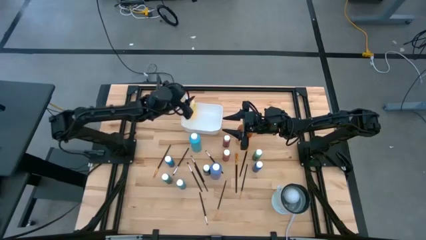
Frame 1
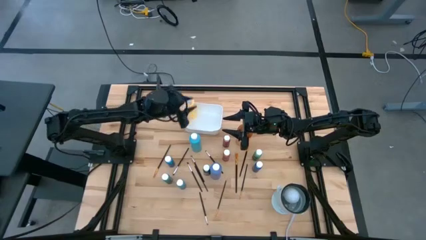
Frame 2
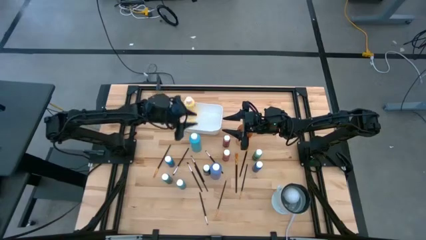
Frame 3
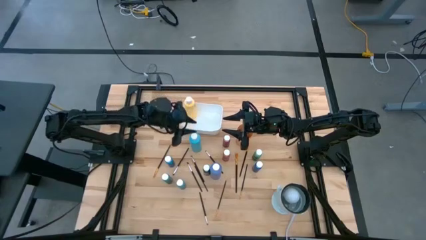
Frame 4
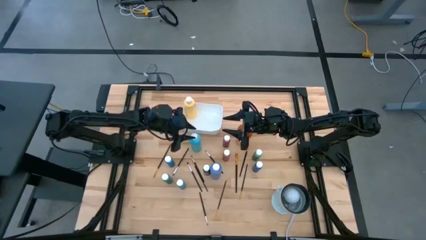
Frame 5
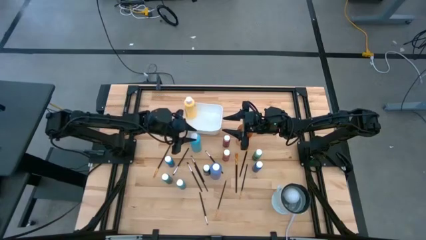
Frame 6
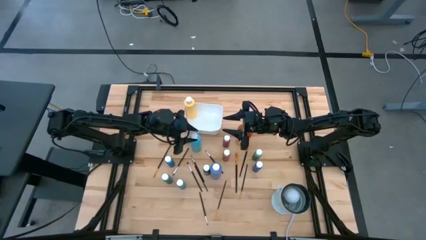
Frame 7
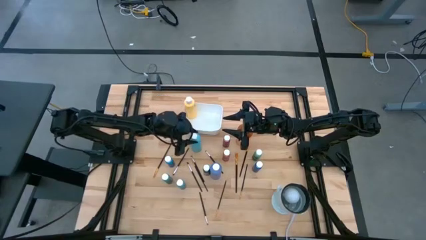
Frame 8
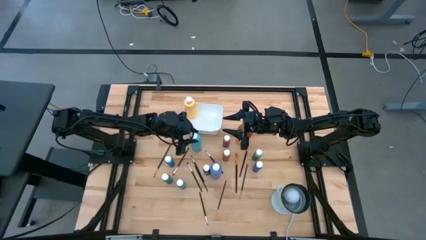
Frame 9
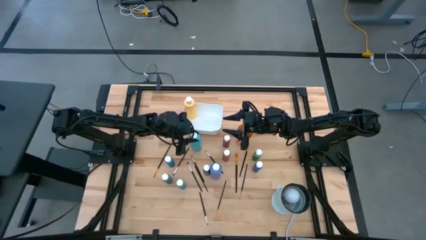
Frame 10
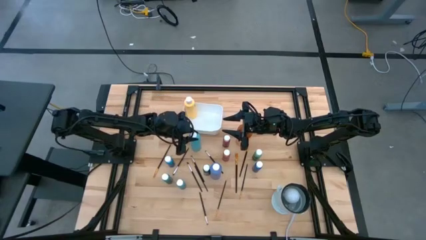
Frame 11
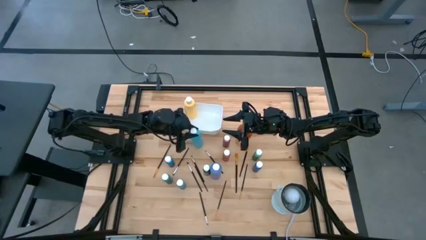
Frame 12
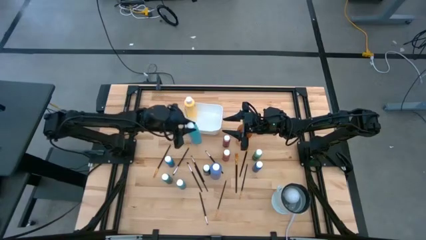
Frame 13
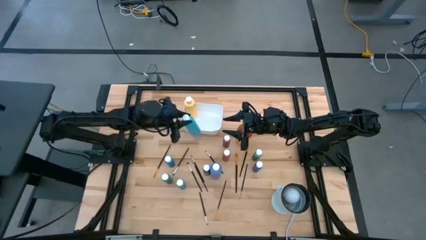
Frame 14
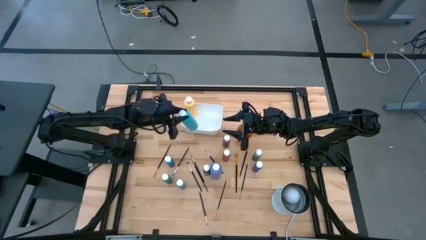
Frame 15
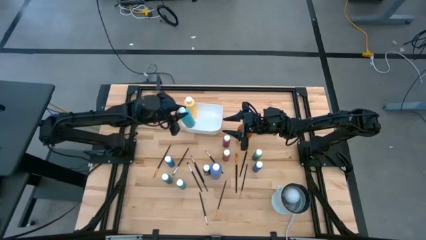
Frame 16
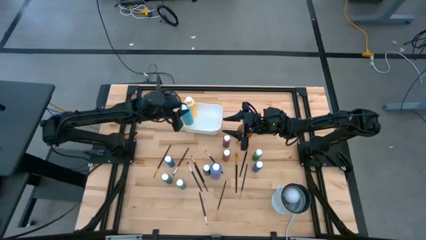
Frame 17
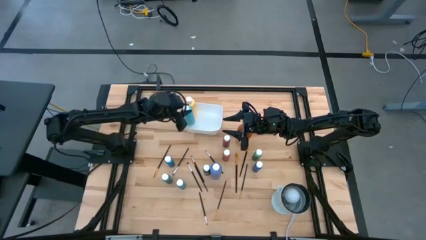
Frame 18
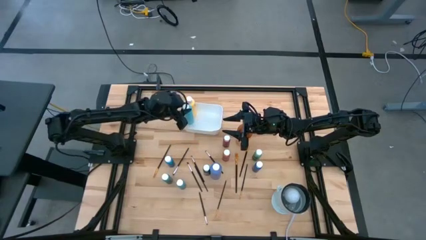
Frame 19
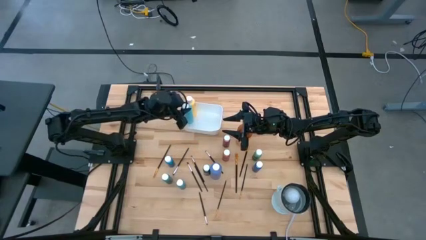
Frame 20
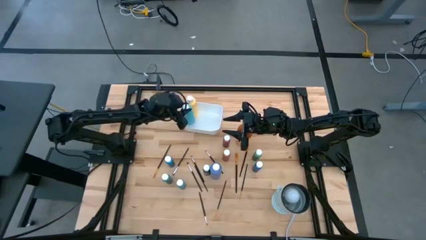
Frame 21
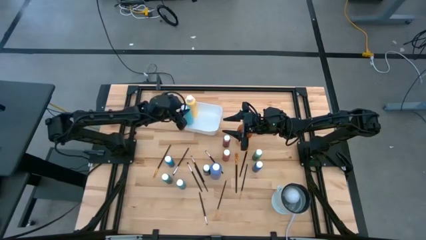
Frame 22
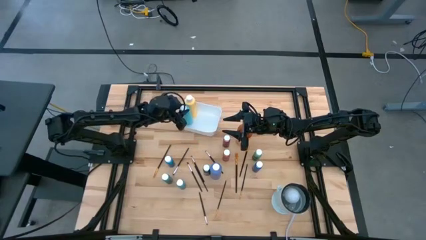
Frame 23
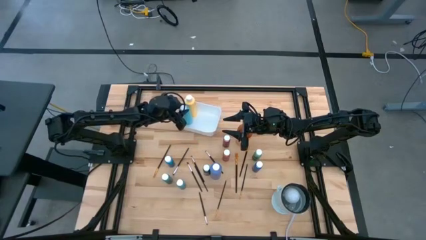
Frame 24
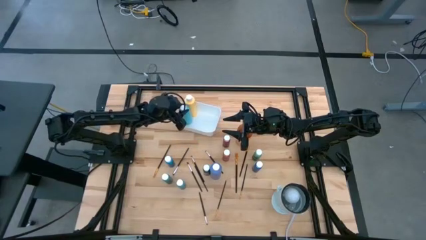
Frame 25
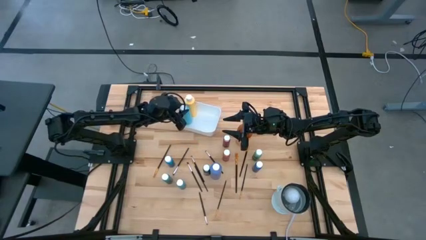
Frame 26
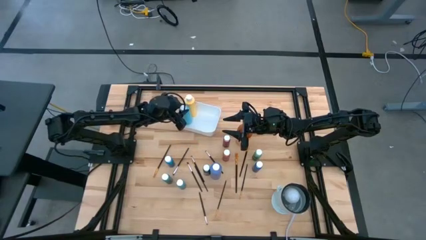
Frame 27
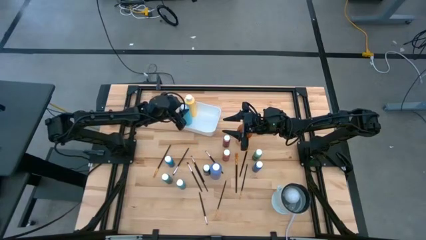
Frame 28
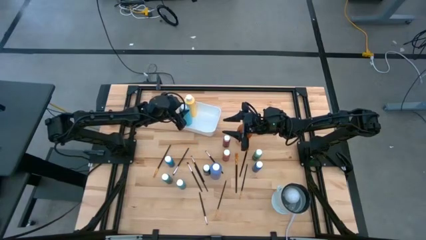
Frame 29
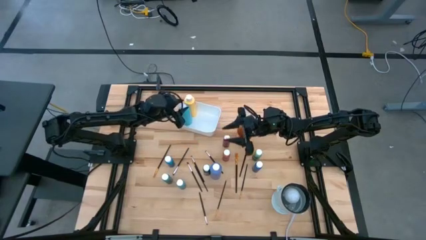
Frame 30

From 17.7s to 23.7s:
Task: Pick & Place Paint Supplies
Put the large light blue paint bottle into the bin

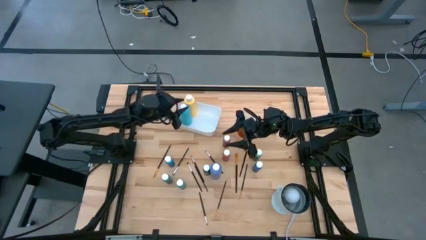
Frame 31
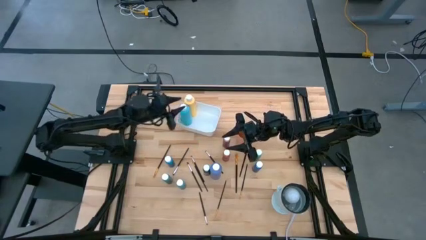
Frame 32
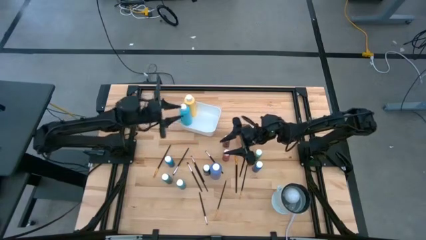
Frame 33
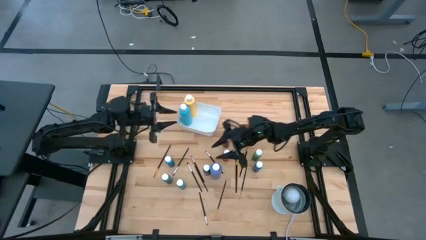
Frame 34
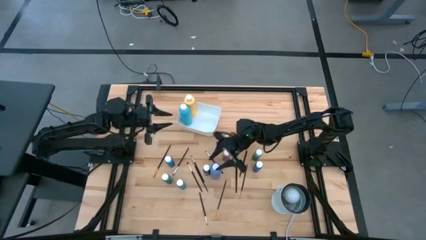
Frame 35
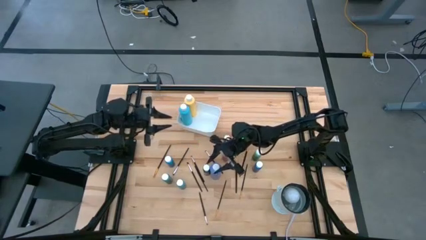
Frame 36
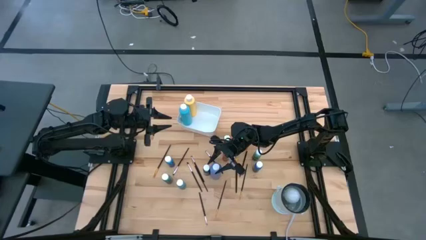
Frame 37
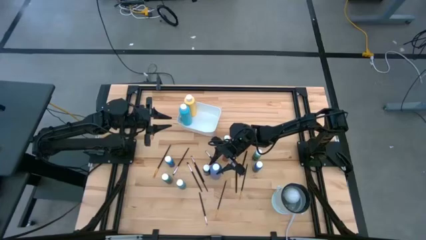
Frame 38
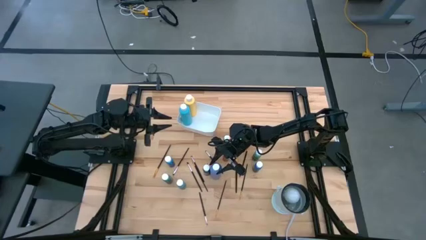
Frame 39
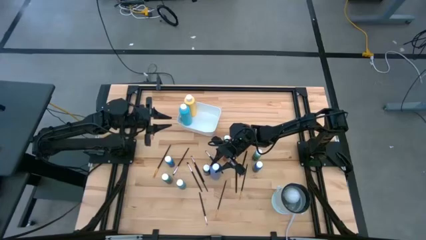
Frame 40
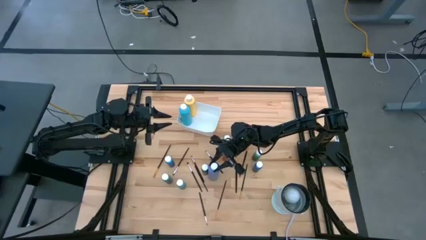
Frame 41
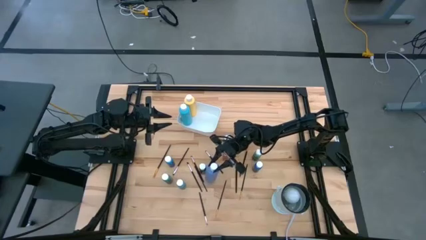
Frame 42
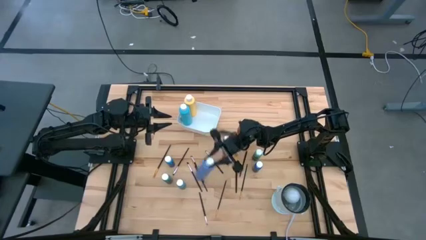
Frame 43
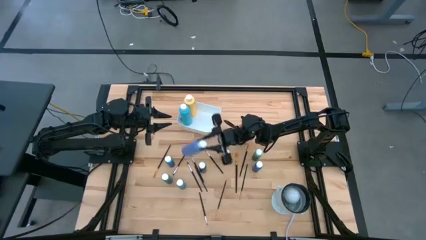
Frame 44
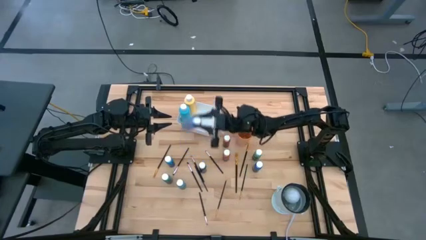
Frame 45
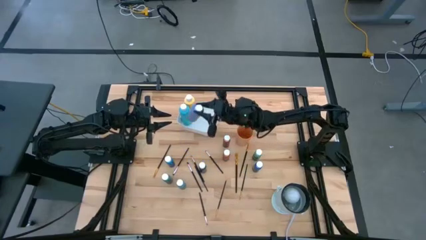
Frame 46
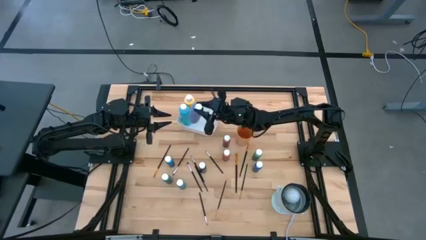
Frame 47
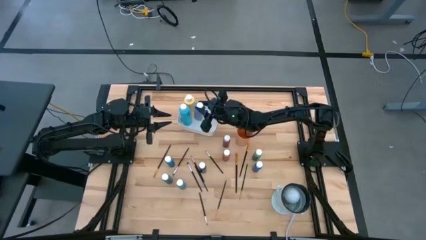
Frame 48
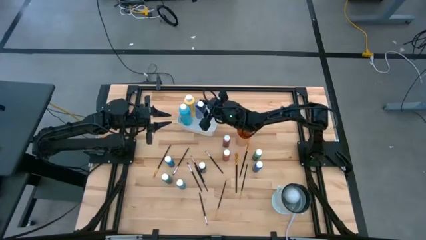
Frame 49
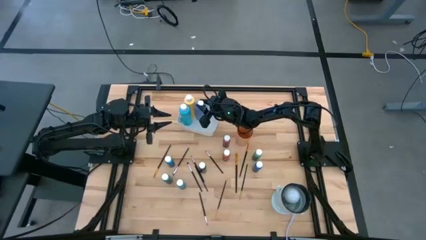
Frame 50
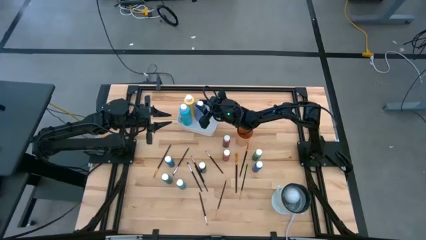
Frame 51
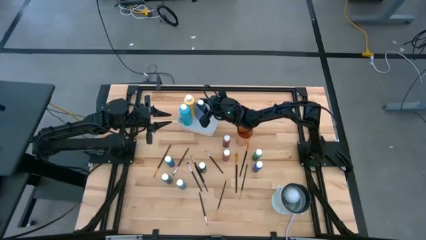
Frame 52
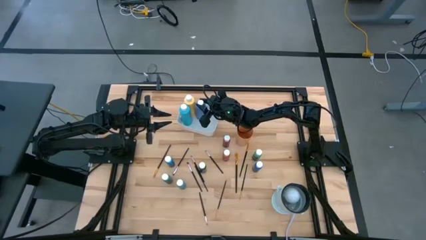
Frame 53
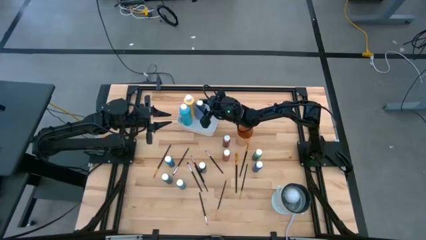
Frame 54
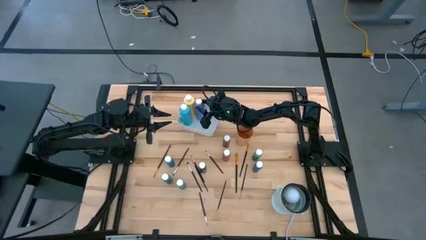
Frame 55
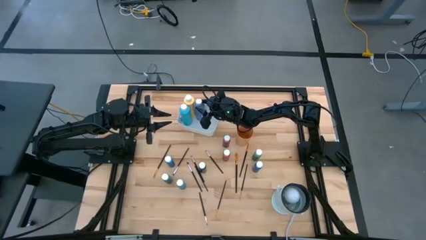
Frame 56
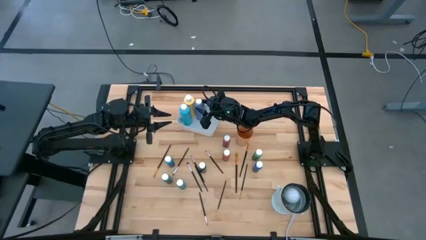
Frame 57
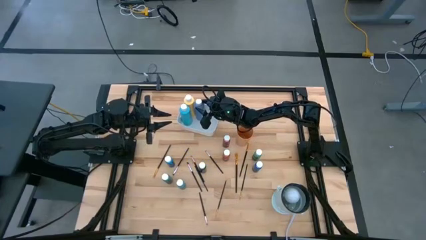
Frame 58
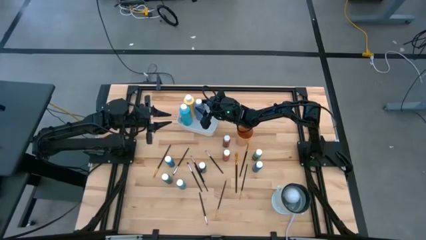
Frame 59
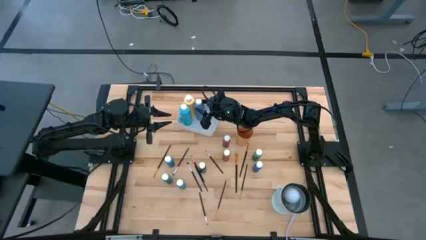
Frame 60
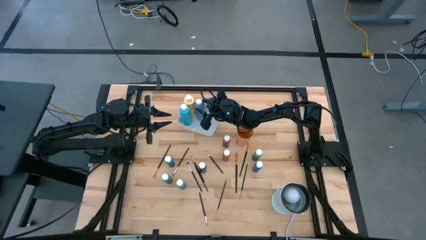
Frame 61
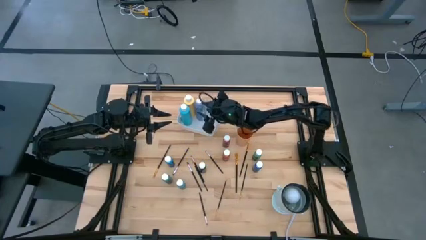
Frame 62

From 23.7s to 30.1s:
Put the large blue paint bottle into the bin

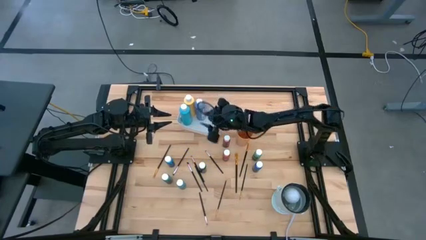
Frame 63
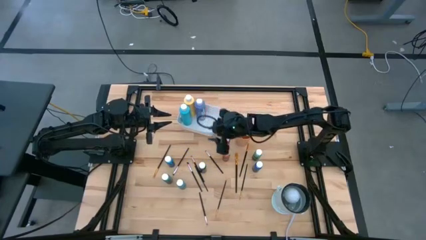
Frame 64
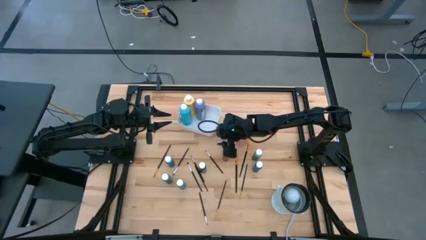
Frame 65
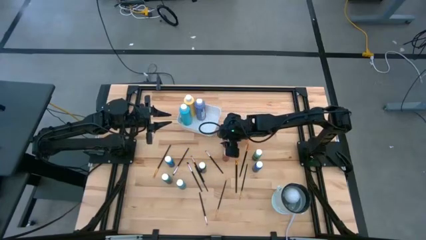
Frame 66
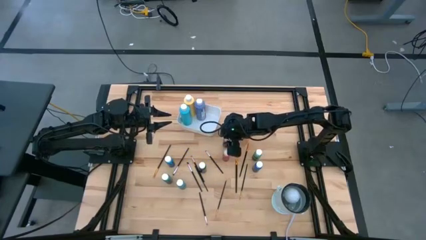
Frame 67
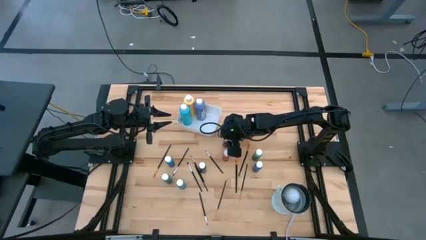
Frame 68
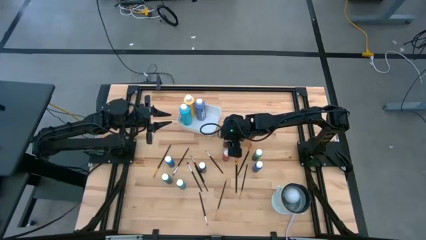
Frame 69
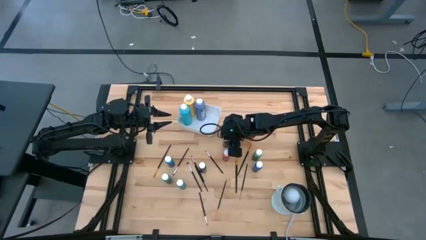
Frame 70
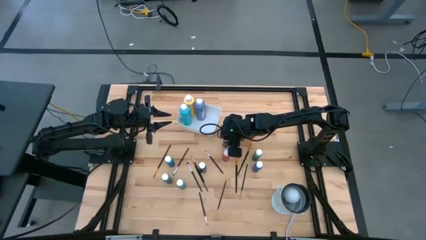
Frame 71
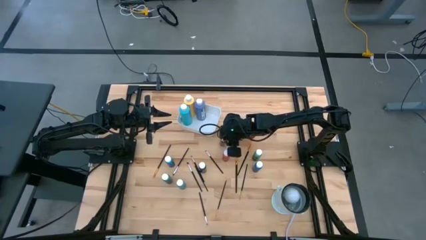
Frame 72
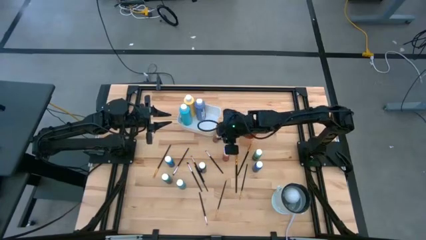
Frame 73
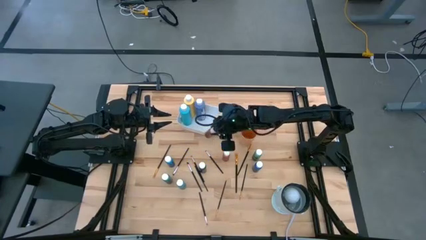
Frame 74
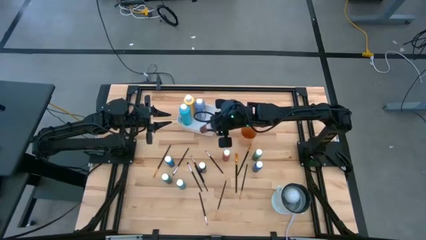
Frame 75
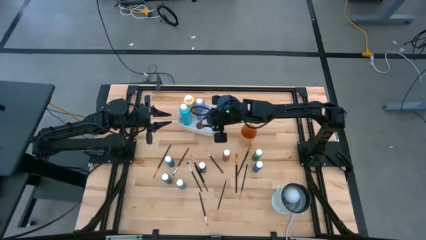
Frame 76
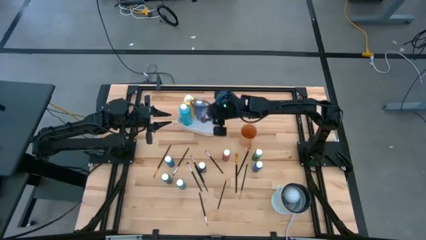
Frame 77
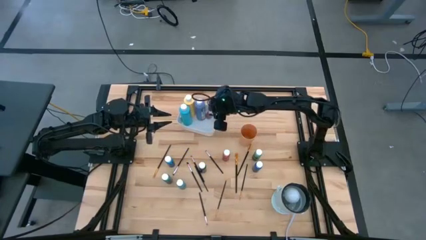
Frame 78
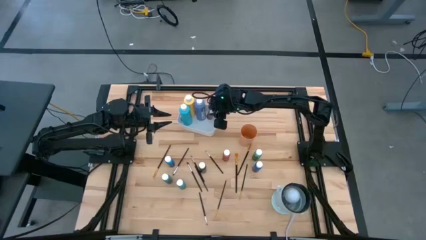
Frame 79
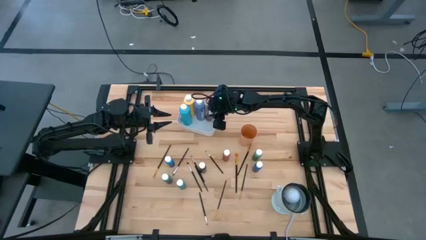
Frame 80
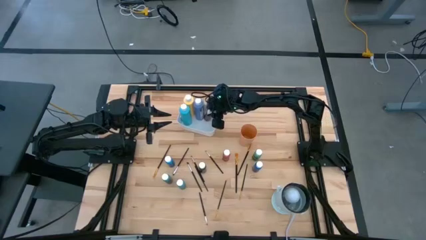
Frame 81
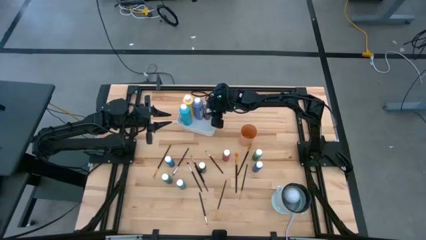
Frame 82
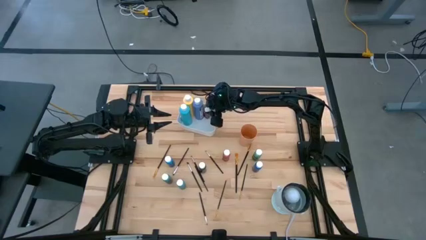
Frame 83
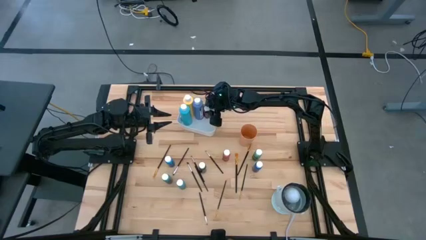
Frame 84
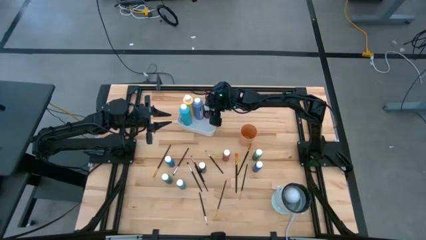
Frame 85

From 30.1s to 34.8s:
Put the small red paint bottle into the bin
